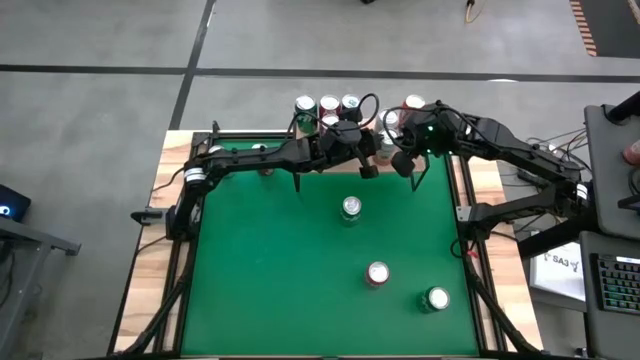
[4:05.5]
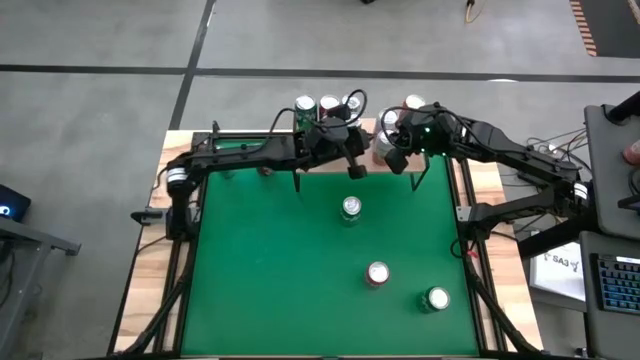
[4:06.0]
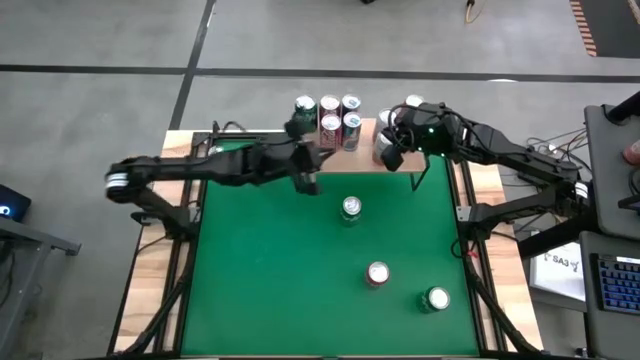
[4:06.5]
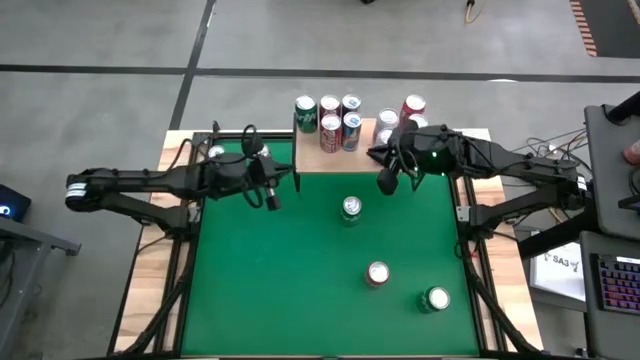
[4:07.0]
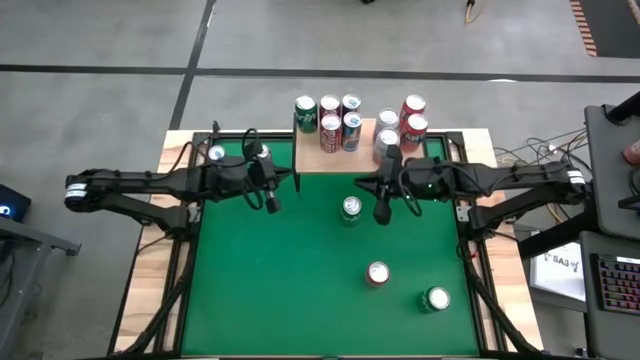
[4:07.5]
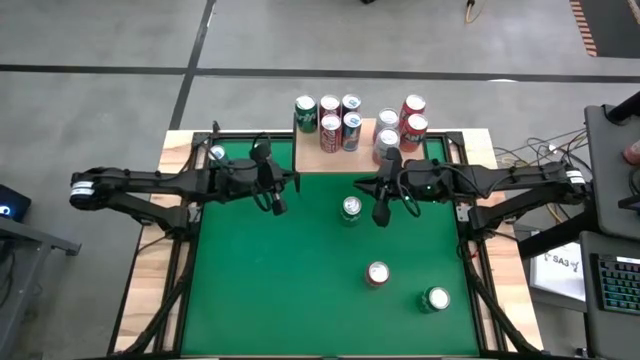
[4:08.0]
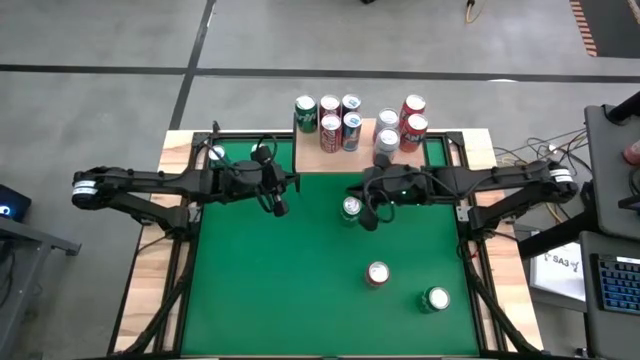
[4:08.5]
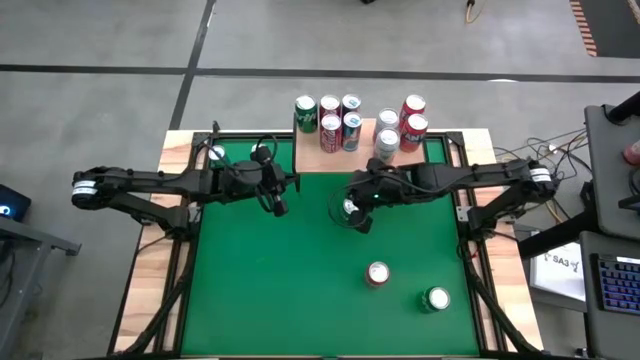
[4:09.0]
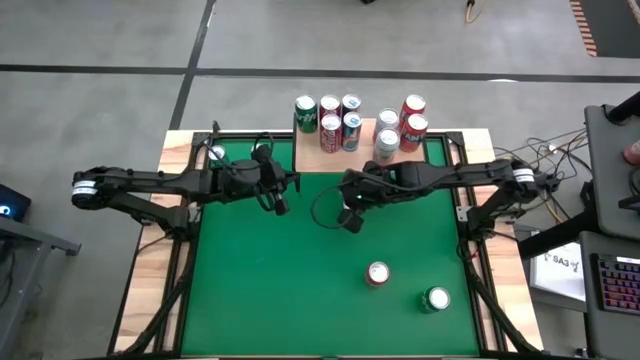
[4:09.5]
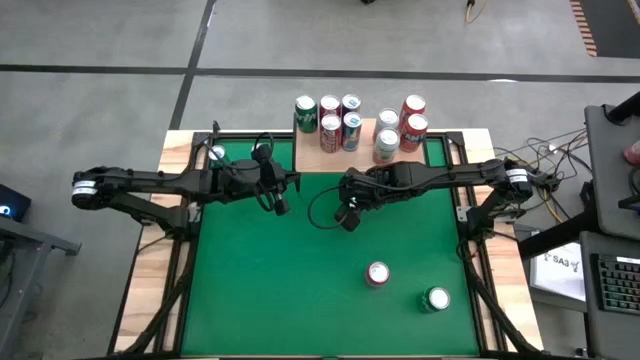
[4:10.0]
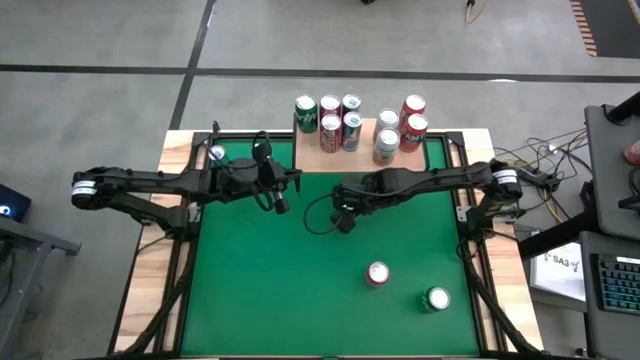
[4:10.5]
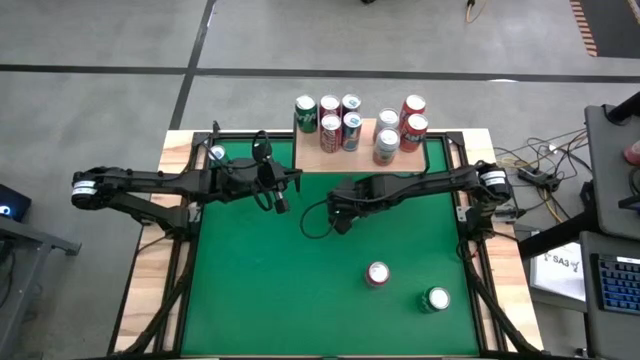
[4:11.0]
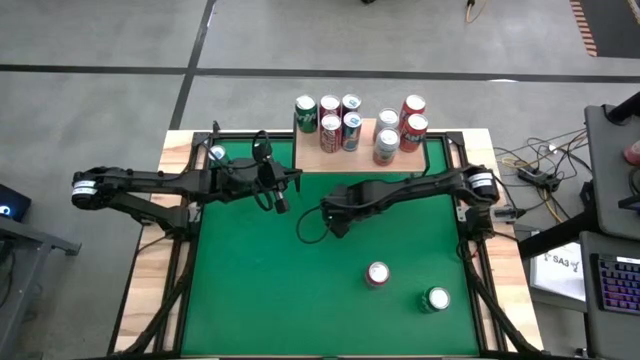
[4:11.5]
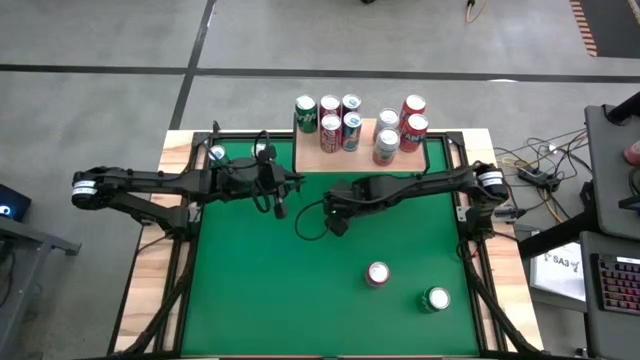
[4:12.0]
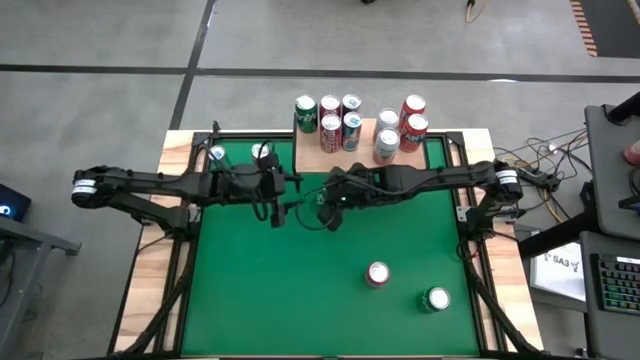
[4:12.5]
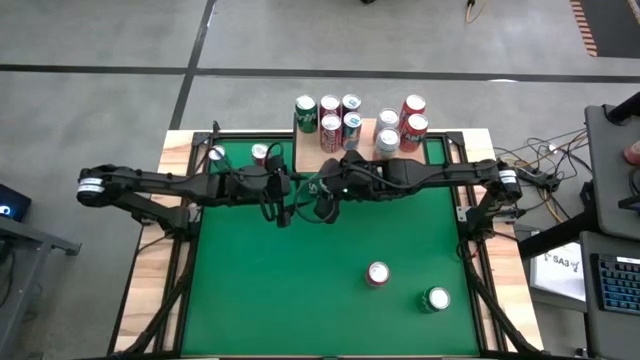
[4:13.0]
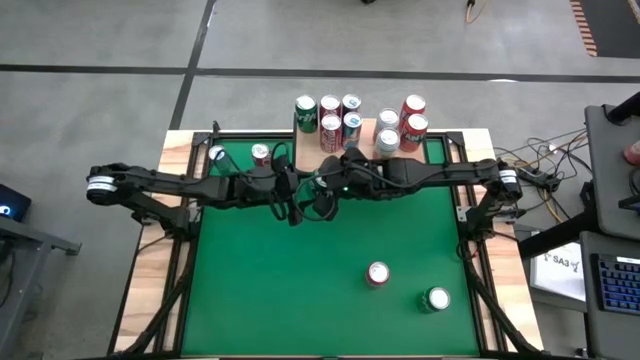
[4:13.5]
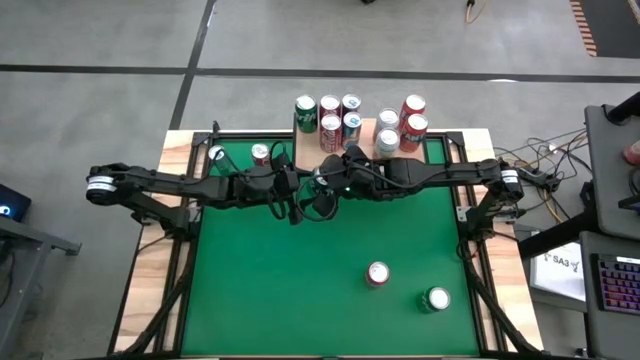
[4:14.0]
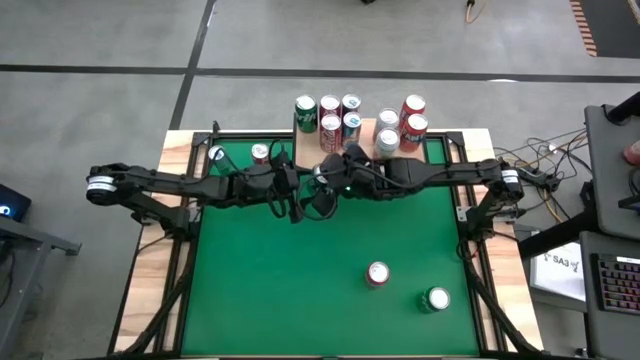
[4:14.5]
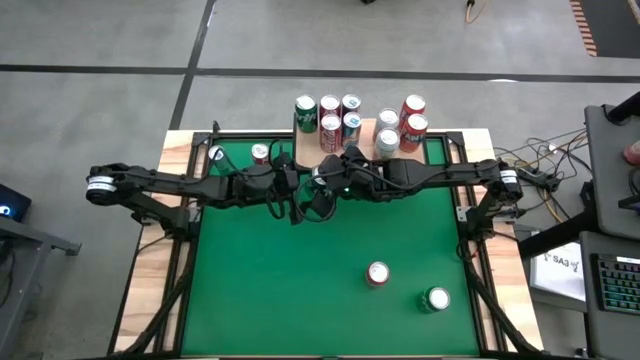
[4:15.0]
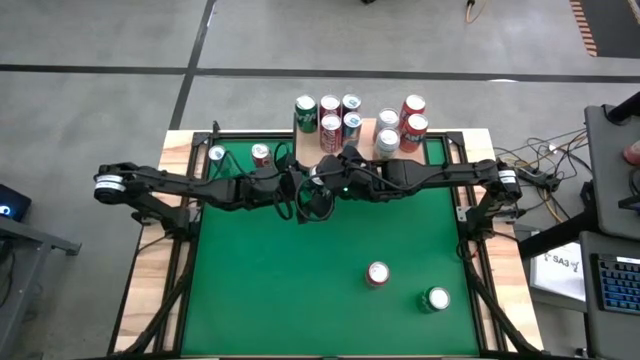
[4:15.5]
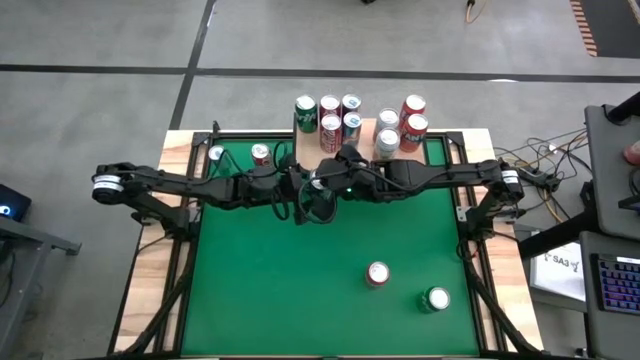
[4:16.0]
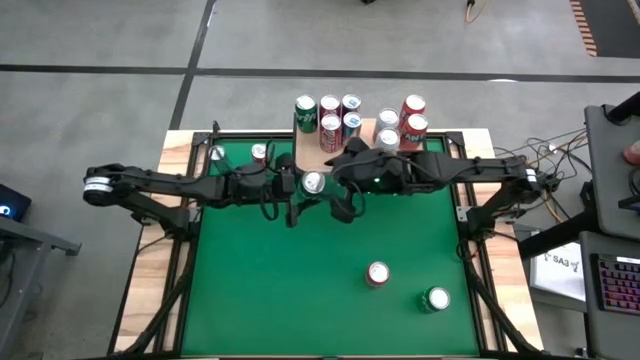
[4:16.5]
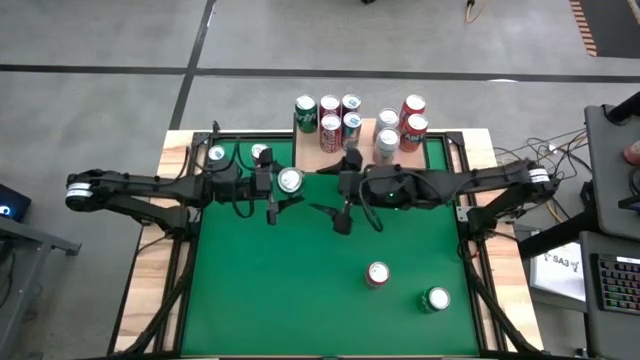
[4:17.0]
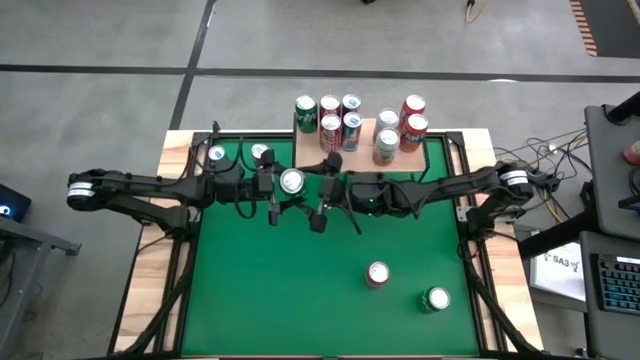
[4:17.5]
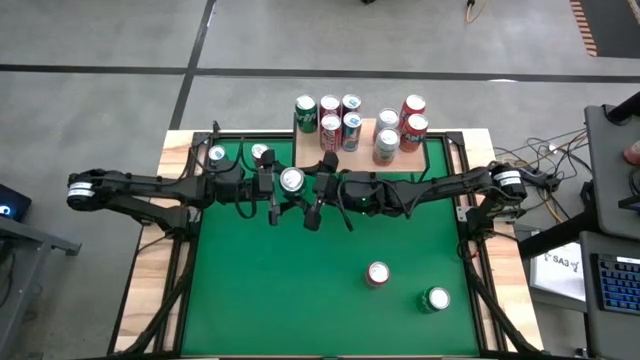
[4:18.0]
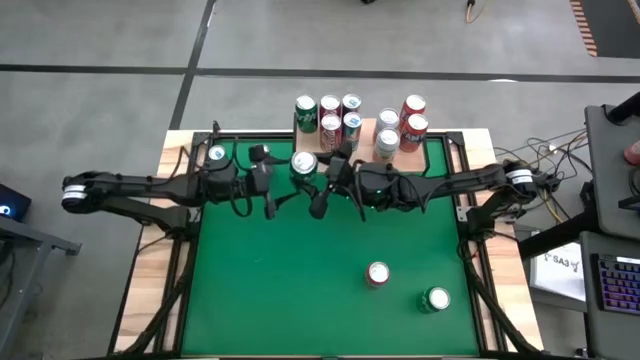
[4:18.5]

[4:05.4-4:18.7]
Task: Place canned beverage on shelf
Put the top green soda can aligned with the green soda can on the shelf

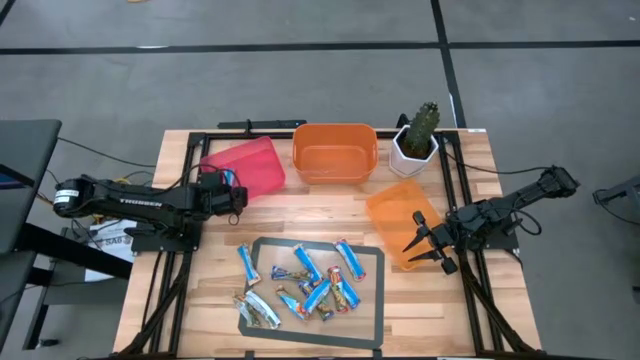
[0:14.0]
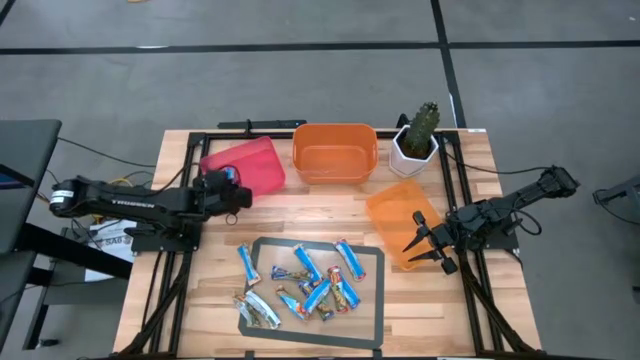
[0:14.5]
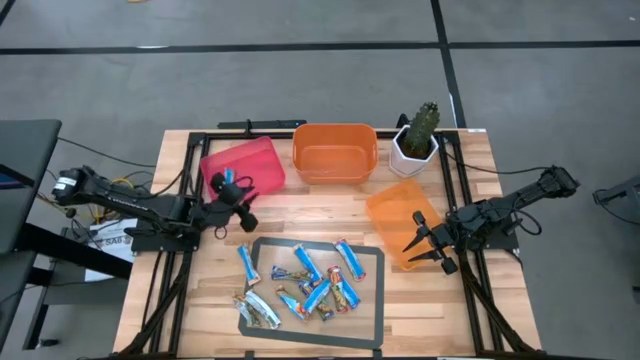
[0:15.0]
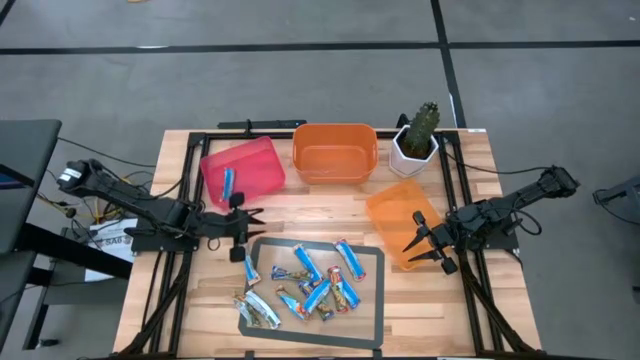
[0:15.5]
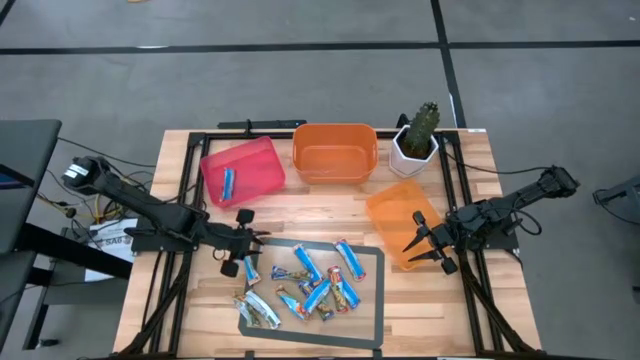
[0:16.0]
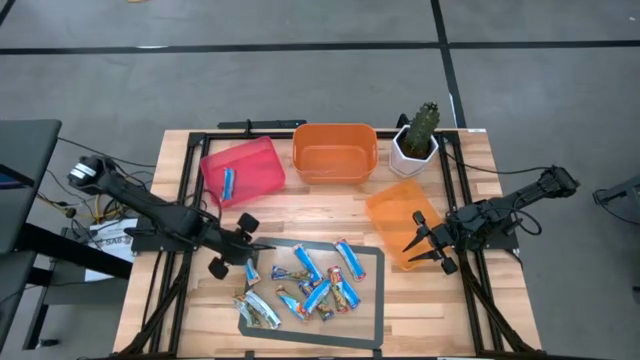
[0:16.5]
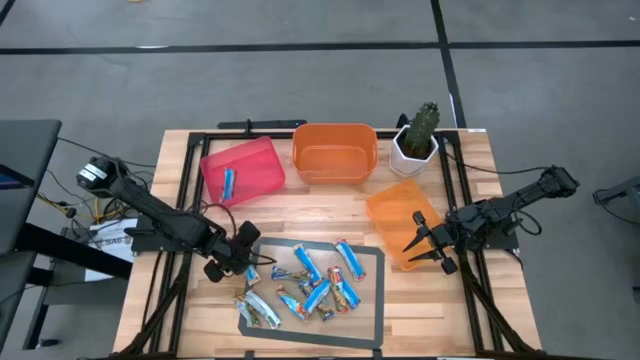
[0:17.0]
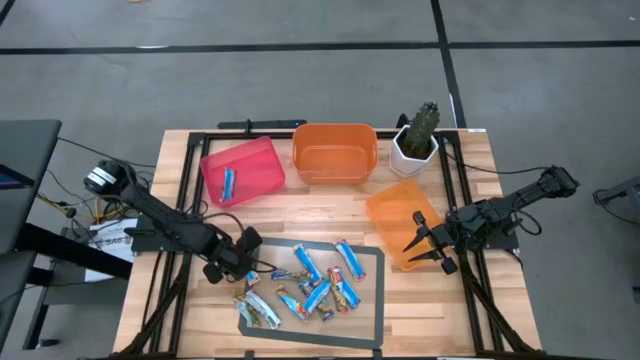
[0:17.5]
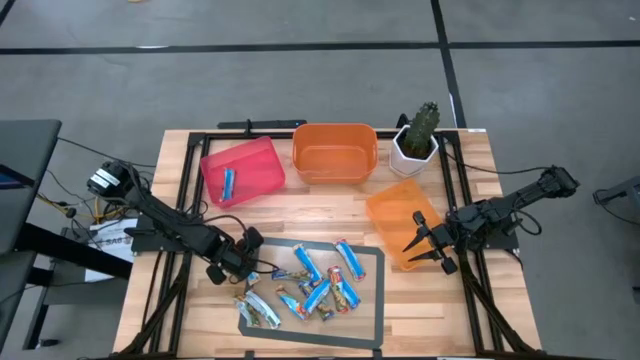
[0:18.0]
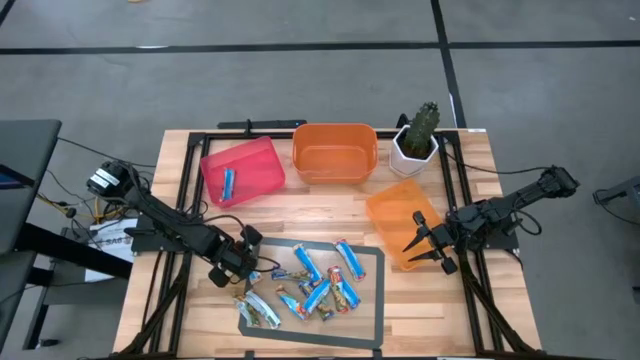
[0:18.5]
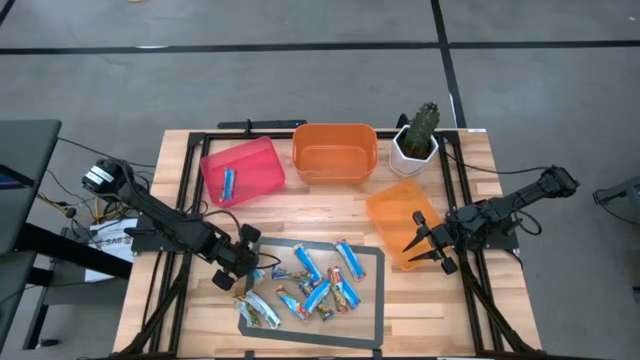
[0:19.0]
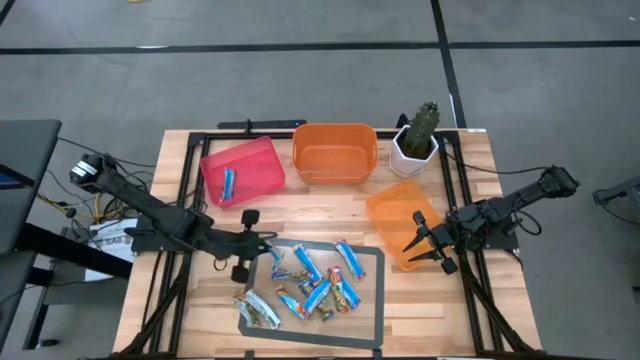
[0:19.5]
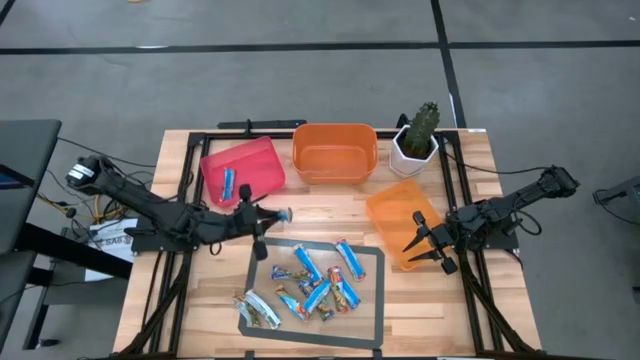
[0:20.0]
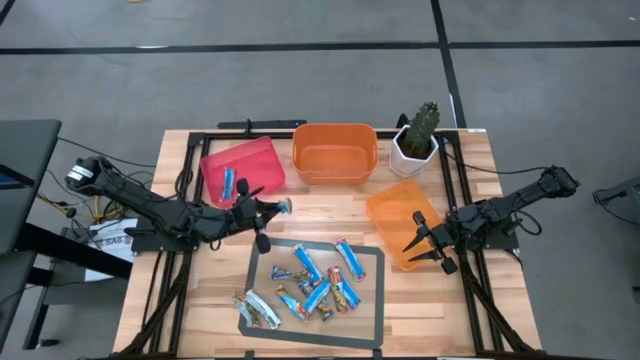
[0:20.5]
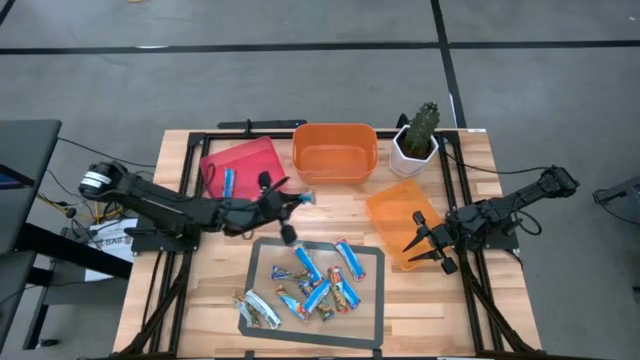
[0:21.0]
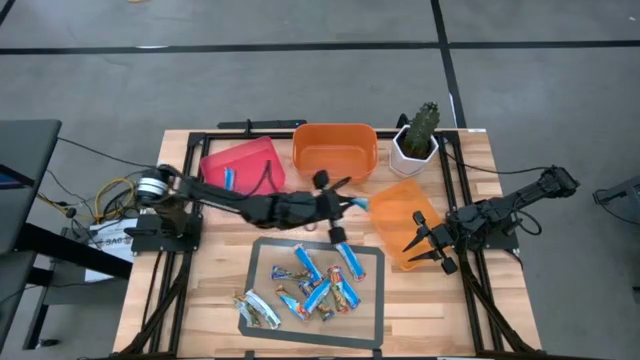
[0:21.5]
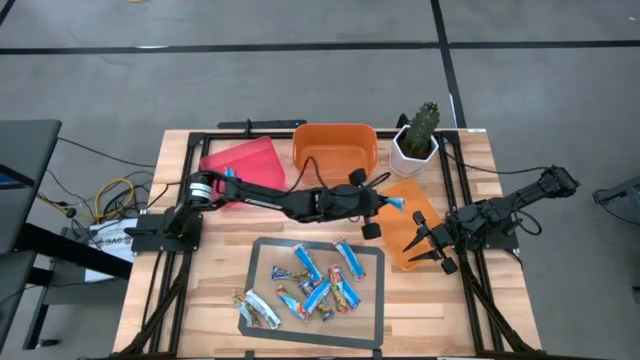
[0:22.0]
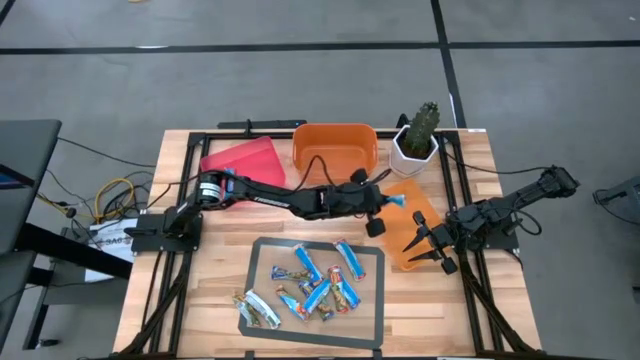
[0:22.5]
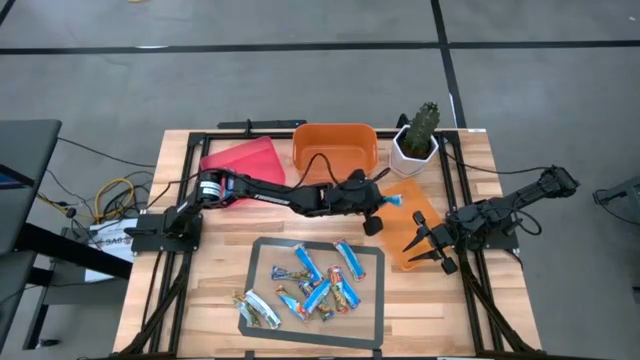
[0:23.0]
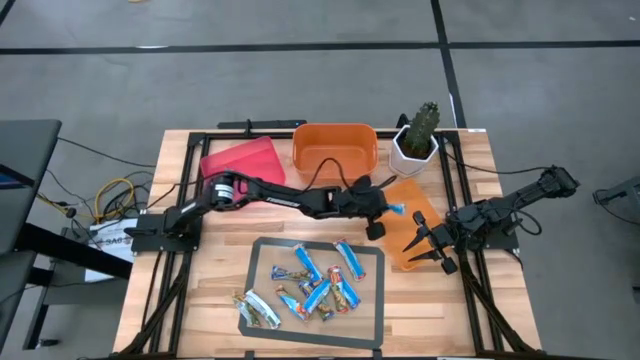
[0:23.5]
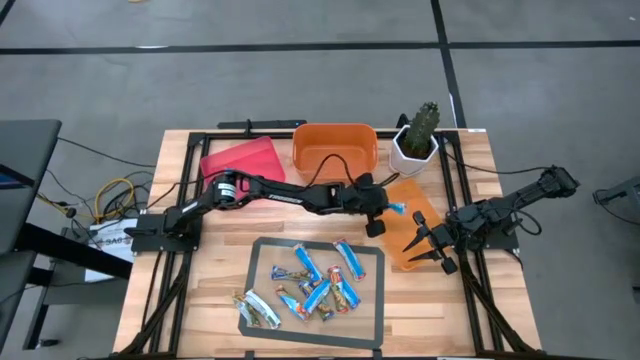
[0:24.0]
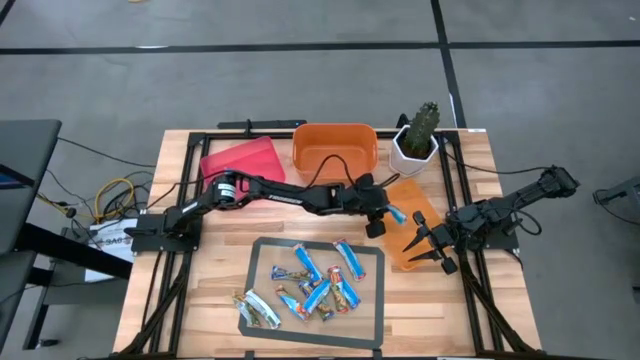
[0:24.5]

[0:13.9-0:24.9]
Task: Pick and place Granola Bars by type
Put the orange granola bar into the light orange bin
